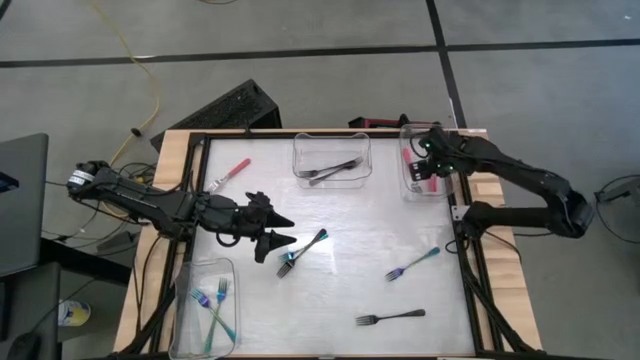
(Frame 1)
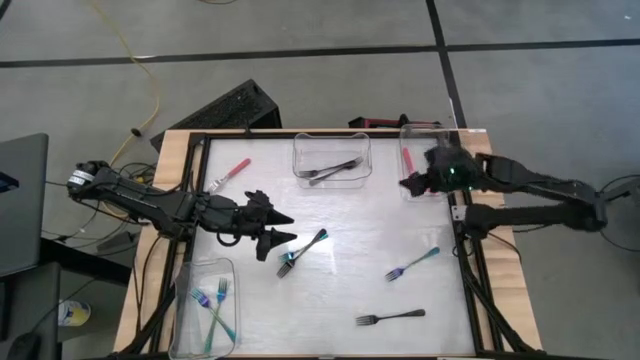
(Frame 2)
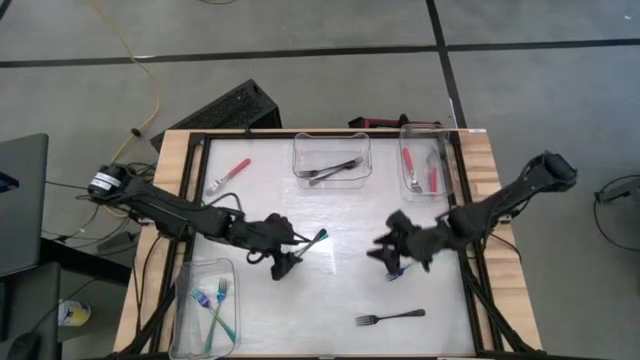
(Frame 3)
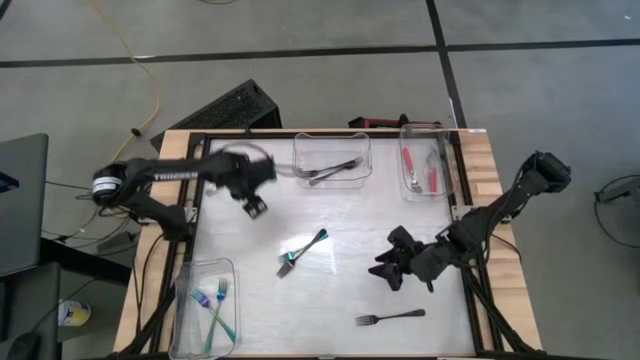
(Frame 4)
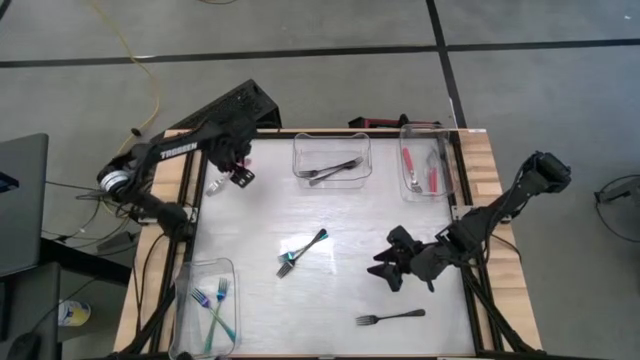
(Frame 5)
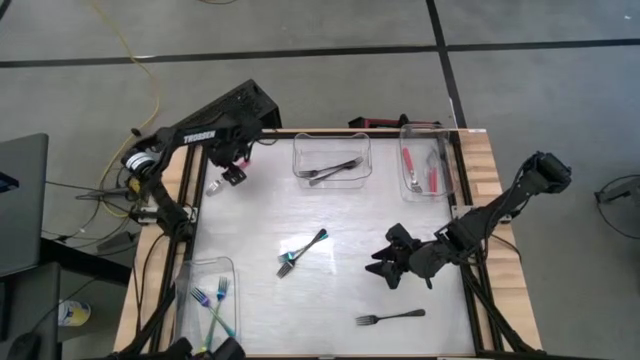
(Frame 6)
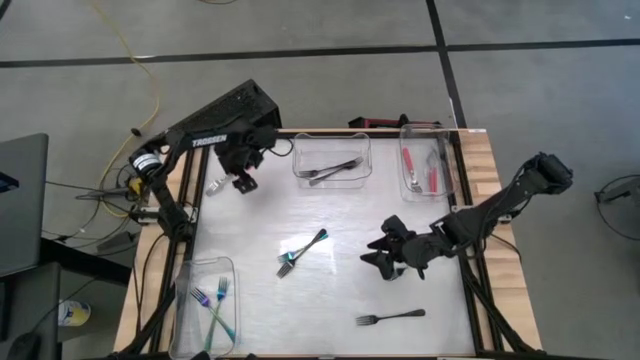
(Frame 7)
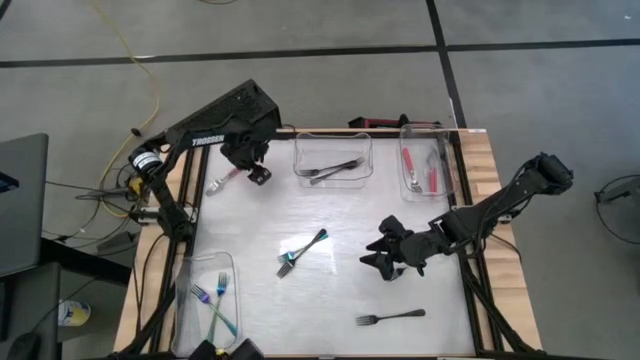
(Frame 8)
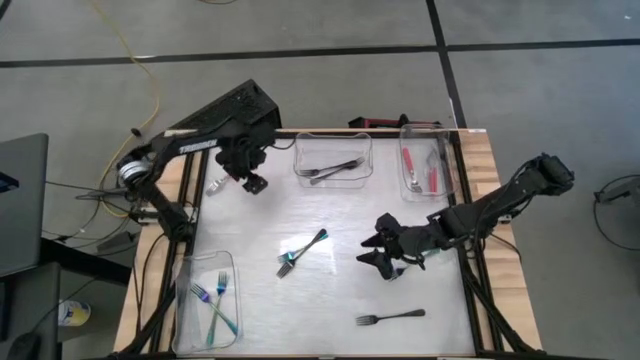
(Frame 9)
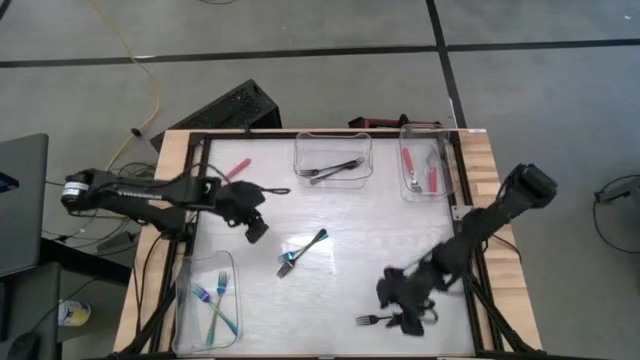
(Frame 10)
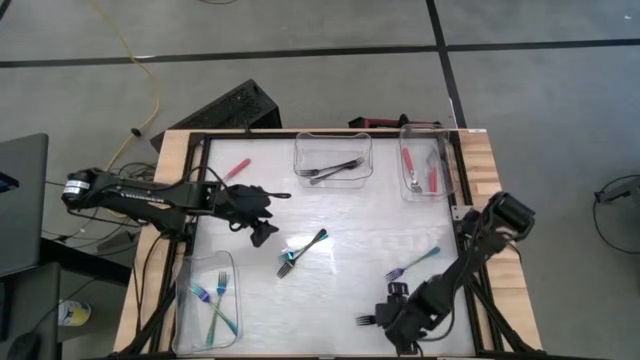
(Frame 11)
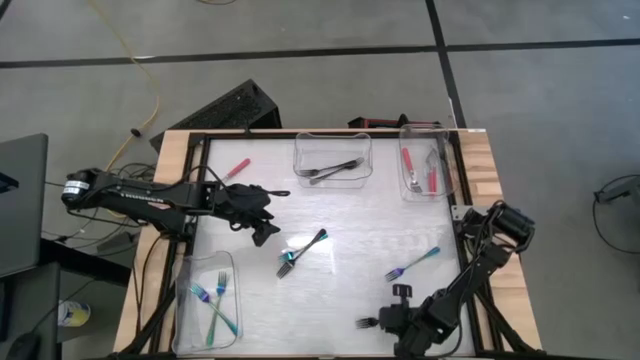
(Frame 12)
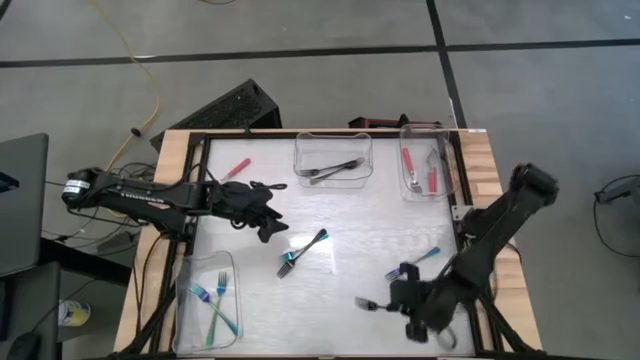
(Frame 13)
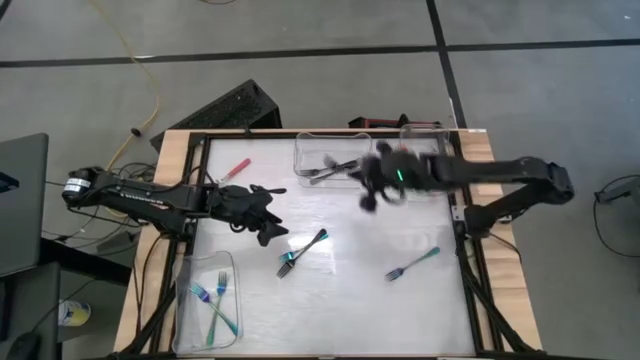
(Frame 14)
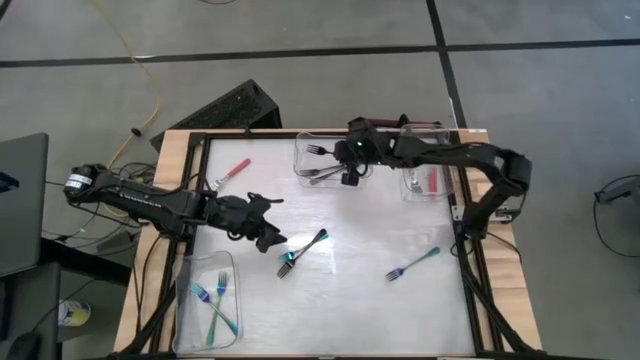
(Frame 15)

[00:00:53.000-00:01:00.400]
Task: Sort silverware by color (type)
Put the bottom black fork into the top transparent bin

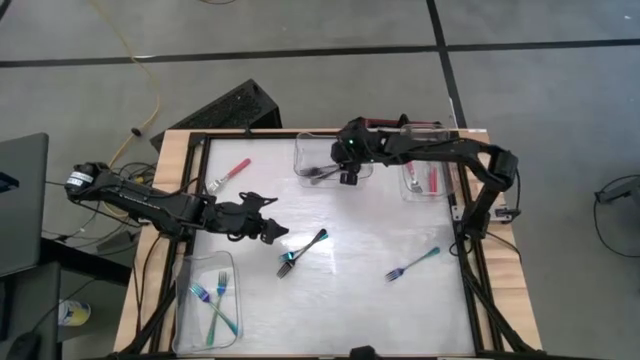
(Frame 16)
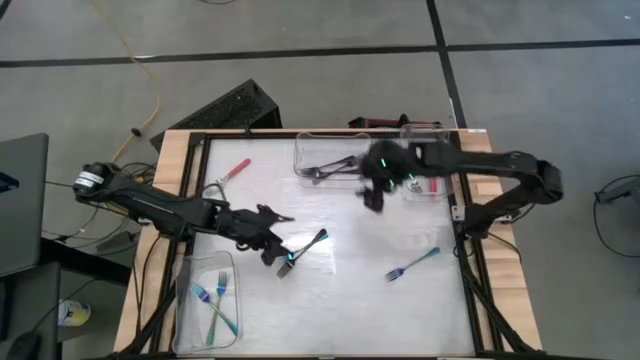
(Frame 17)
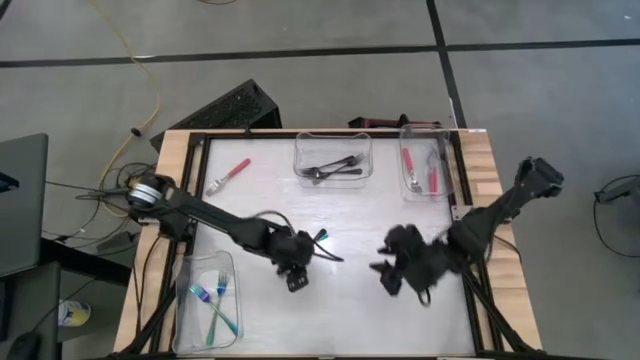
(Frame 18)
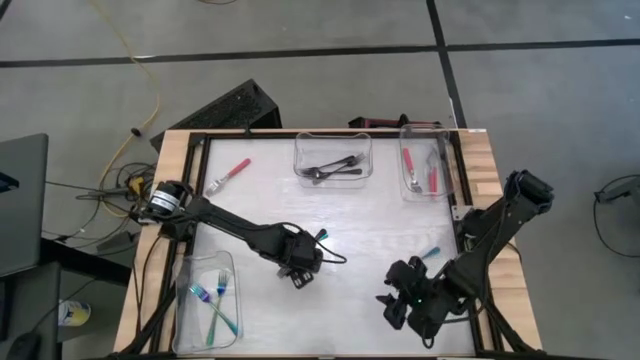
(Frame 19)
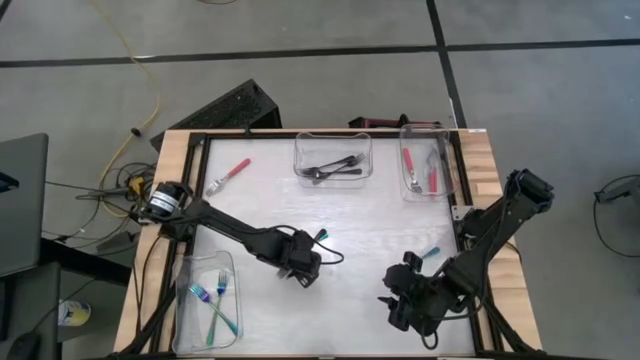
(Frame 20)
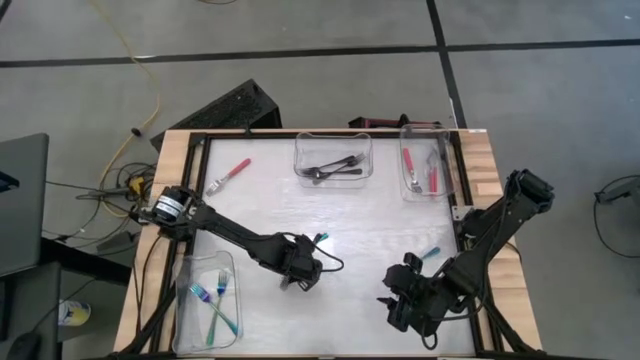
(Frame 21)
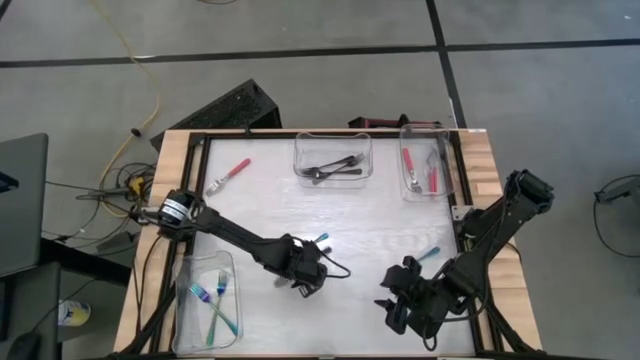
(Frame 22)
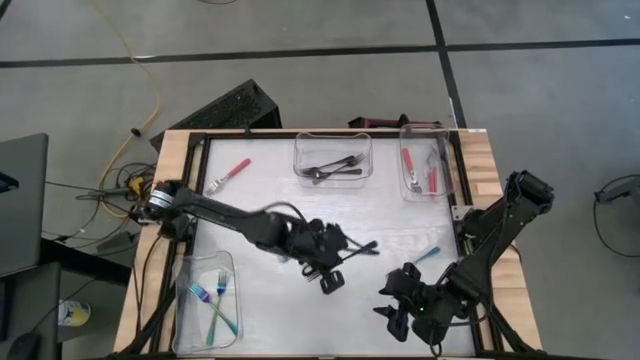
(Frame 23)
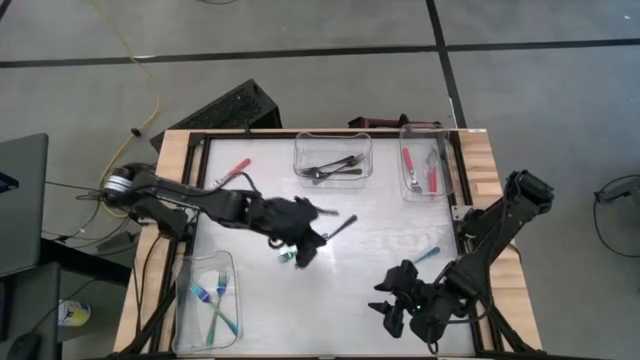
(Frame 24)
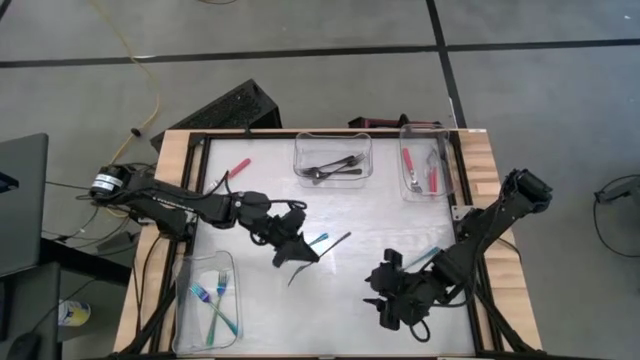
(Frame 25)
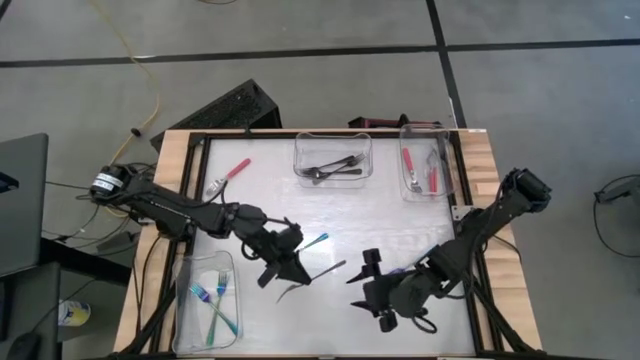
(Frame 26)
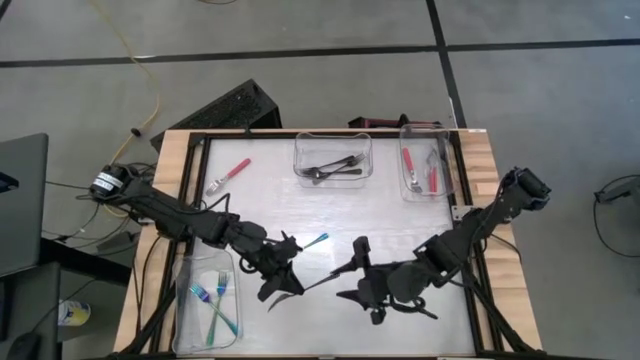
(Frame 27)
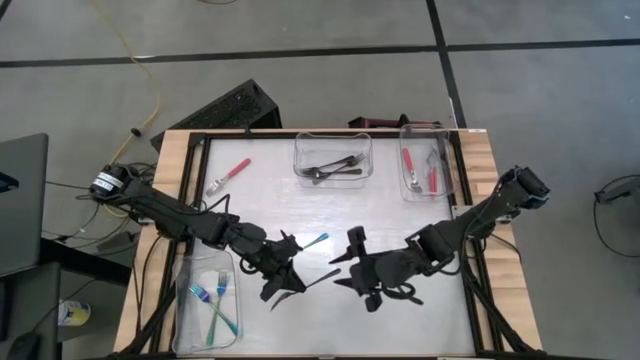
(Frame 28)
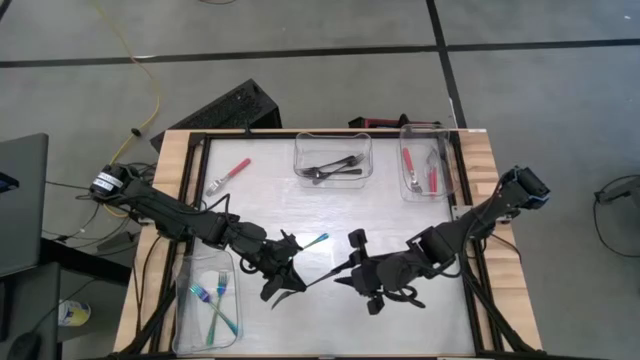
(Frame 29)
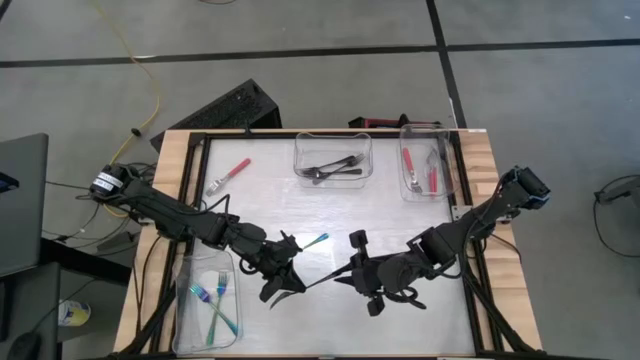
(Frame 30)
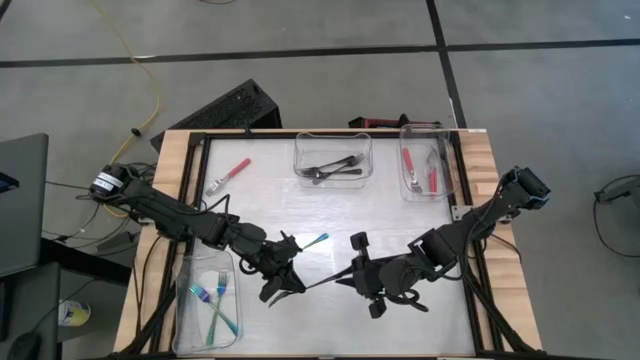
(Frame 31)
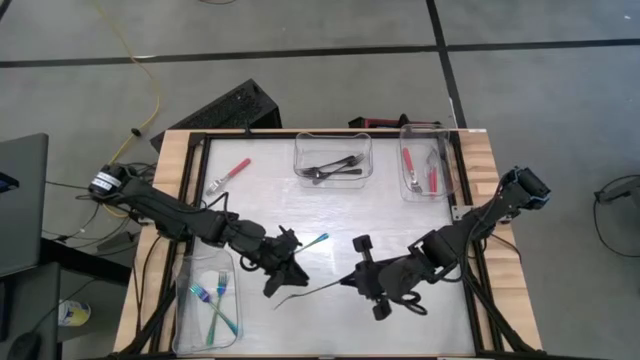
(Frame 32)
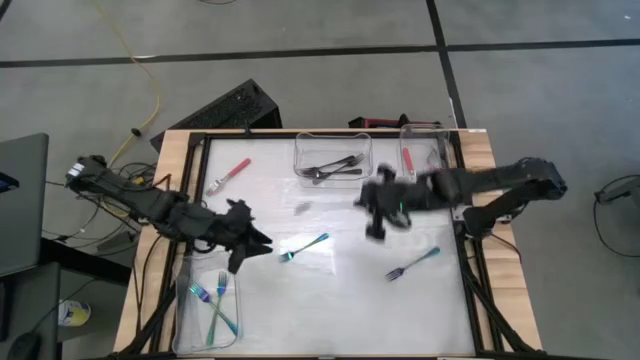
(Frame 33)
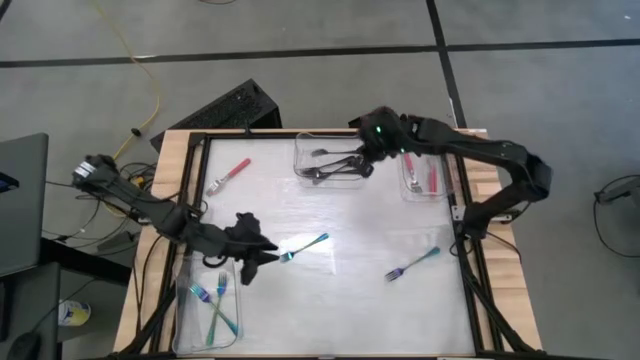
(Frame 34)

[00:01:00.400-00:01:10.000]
Put the black fork into the top transparent bin

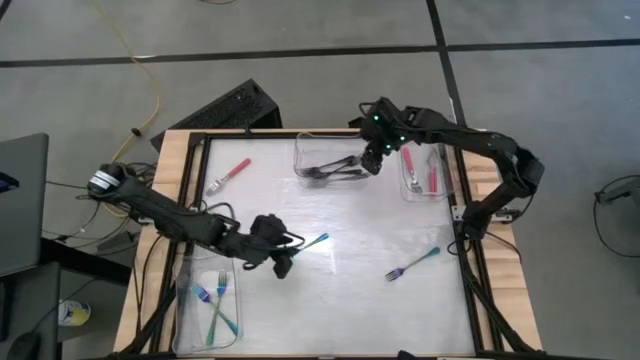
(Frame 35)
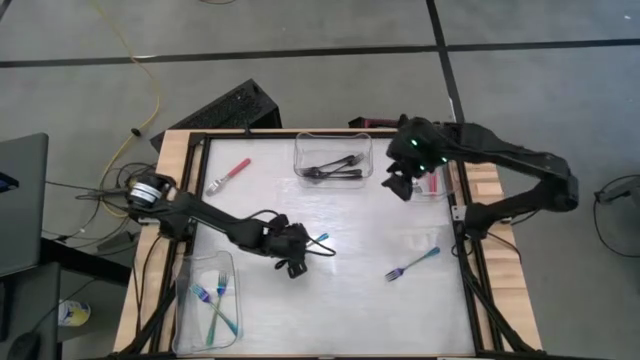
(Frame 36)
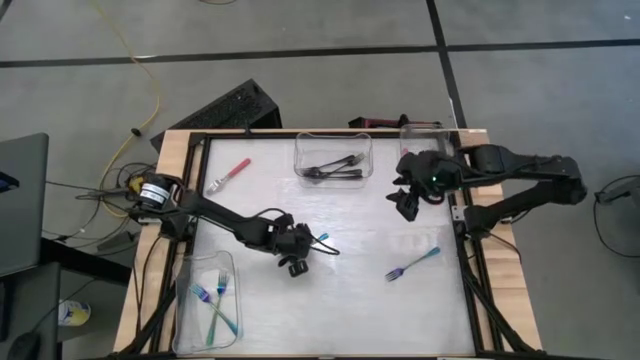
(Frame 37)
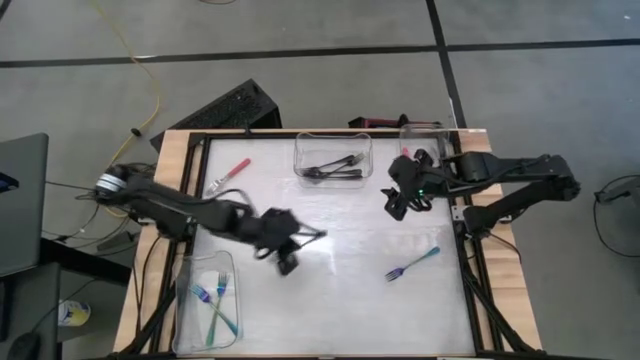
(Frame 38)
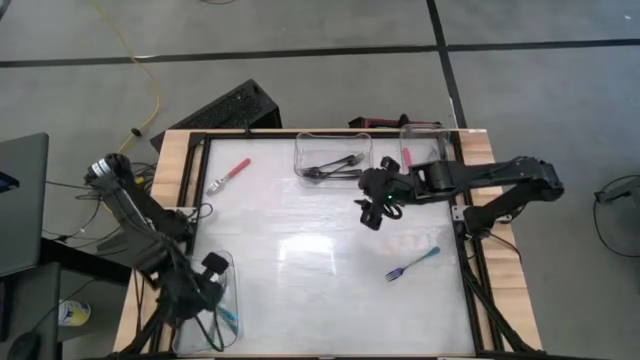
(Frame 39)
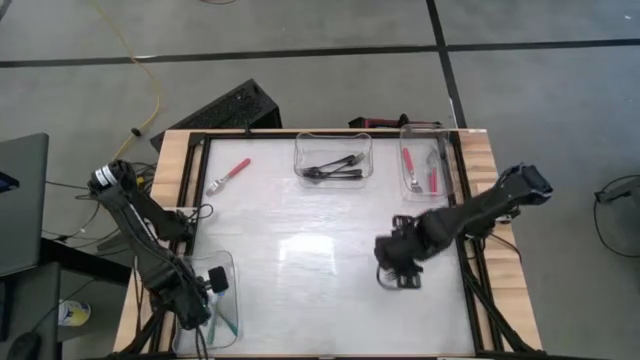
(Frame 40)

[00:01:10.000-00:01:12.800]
Put the left blue fork into the bottom left transparent bin
